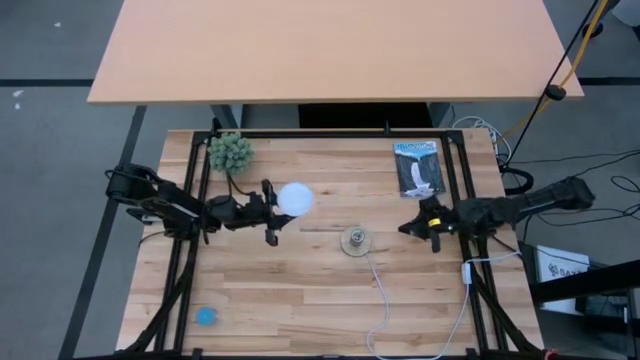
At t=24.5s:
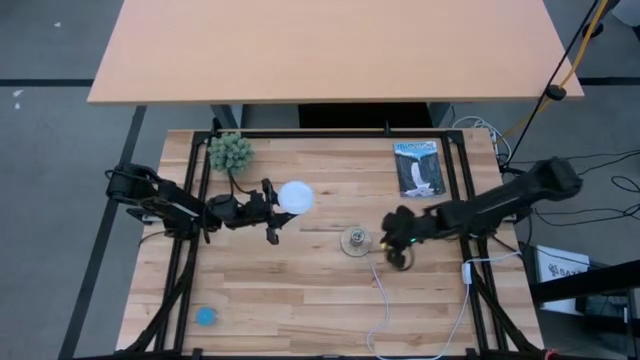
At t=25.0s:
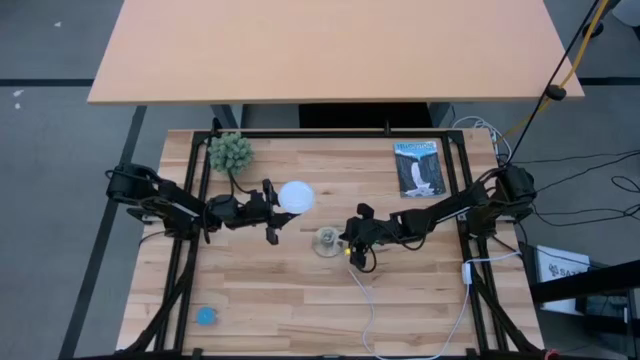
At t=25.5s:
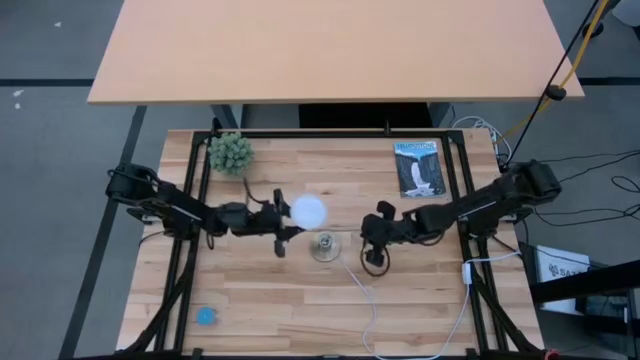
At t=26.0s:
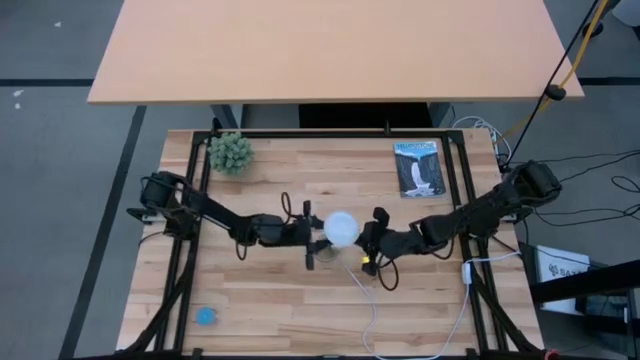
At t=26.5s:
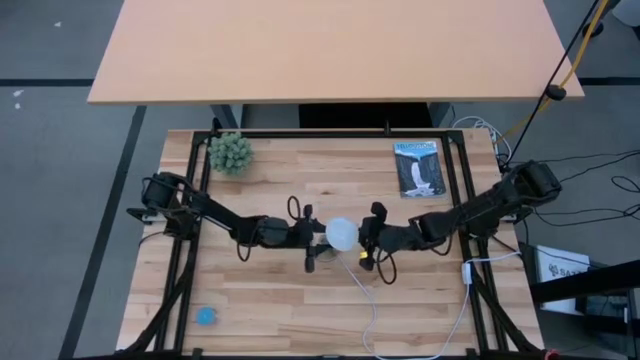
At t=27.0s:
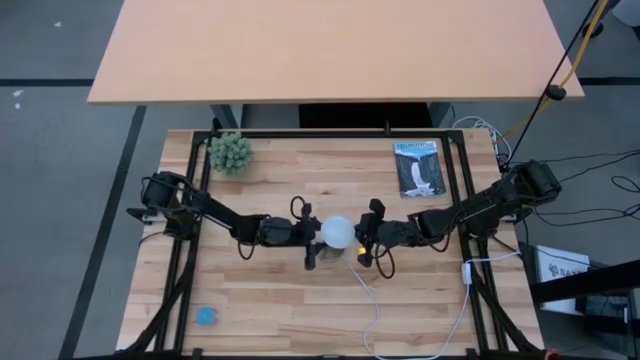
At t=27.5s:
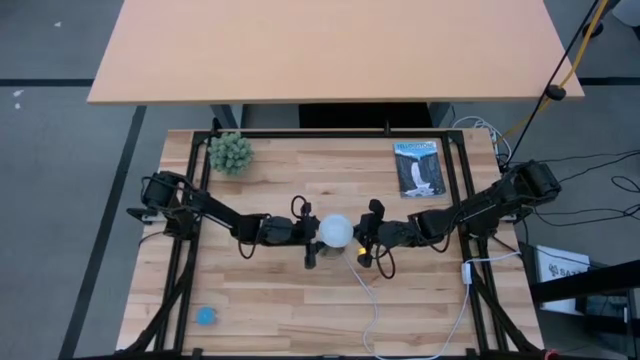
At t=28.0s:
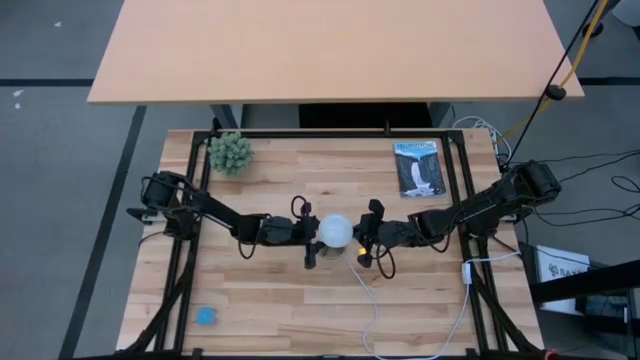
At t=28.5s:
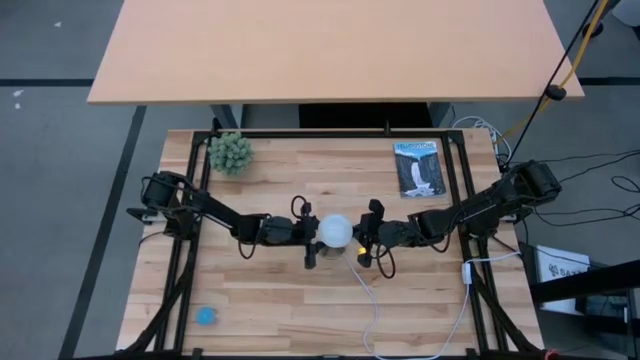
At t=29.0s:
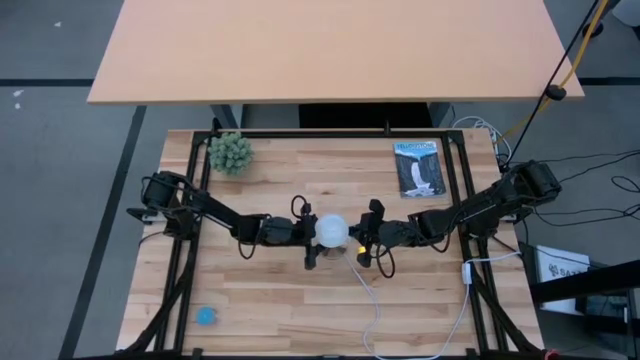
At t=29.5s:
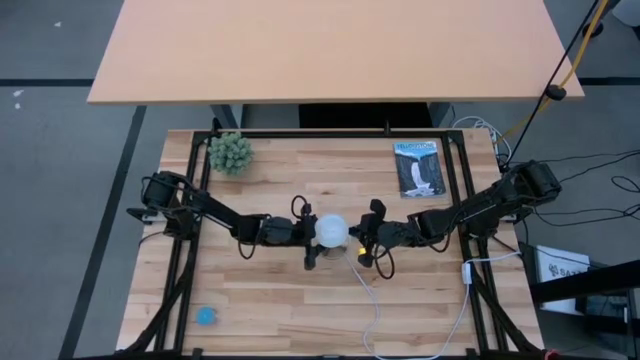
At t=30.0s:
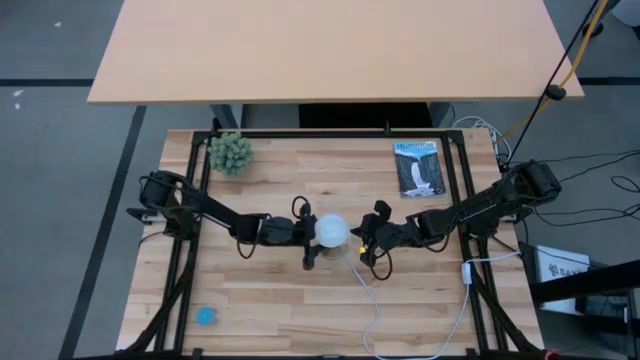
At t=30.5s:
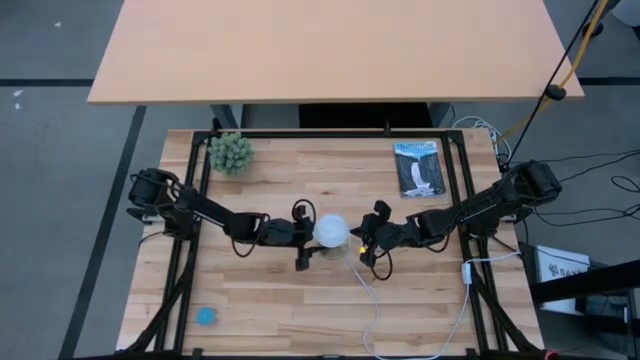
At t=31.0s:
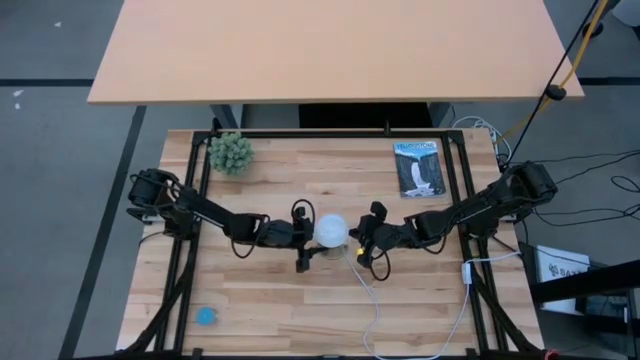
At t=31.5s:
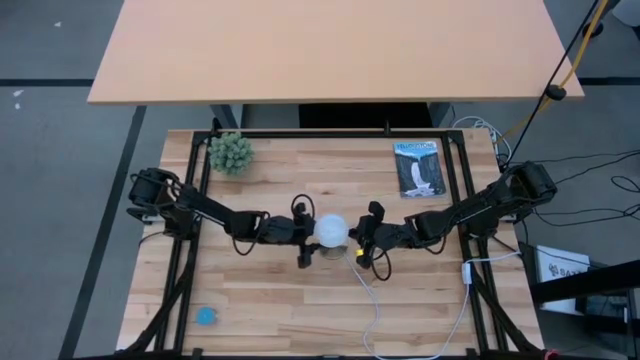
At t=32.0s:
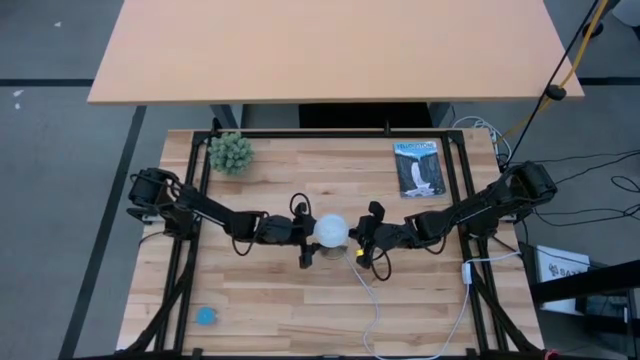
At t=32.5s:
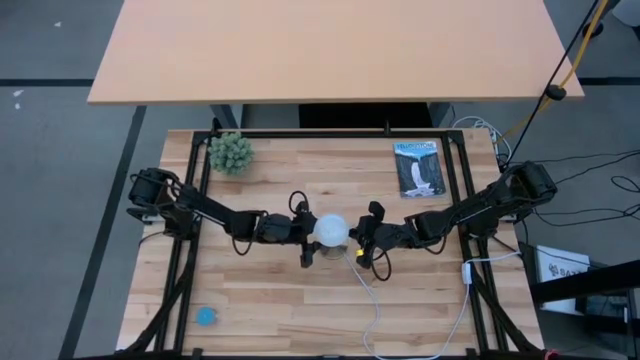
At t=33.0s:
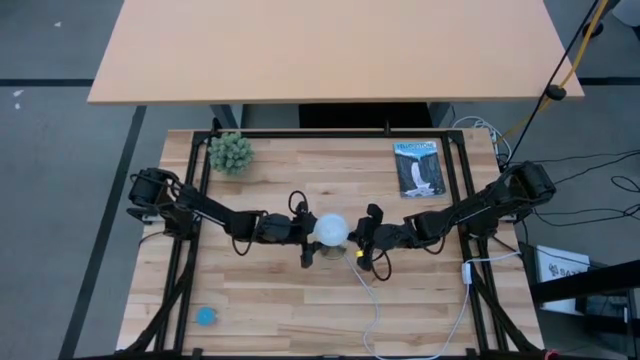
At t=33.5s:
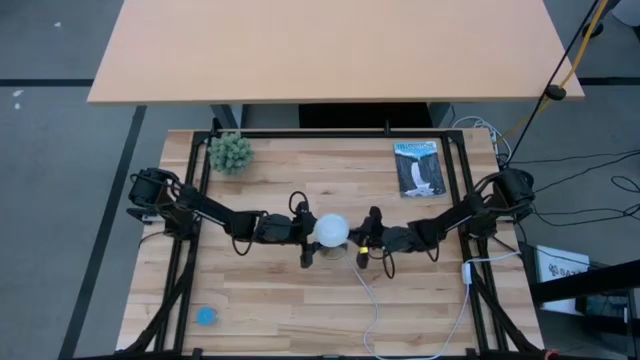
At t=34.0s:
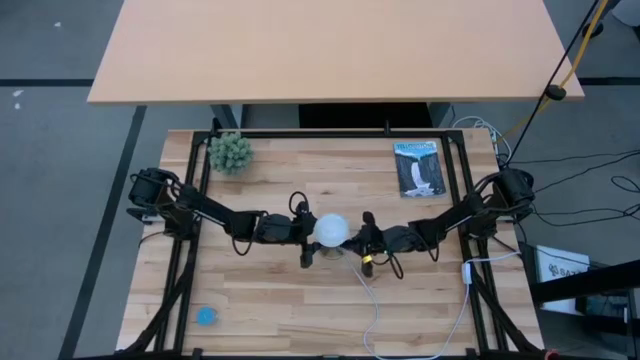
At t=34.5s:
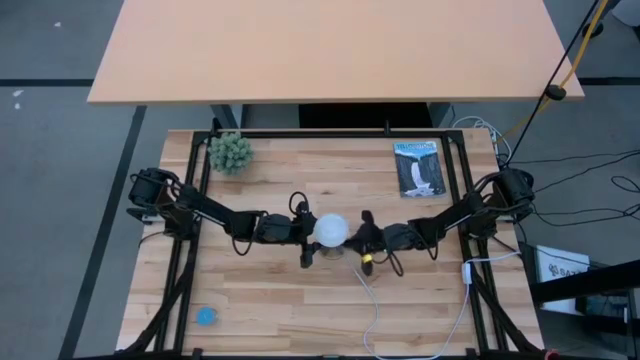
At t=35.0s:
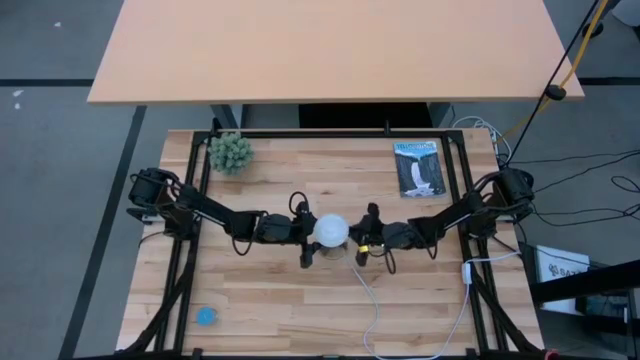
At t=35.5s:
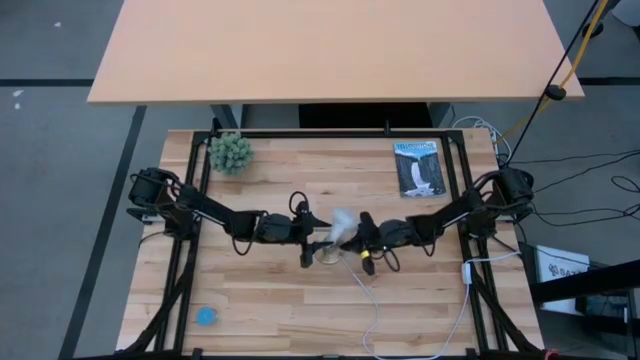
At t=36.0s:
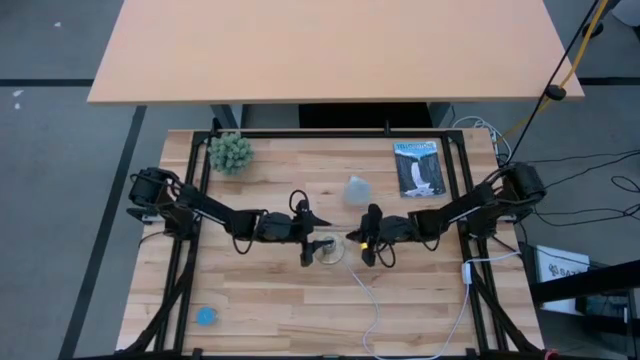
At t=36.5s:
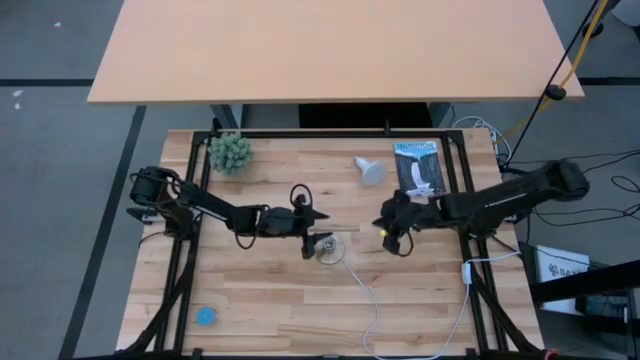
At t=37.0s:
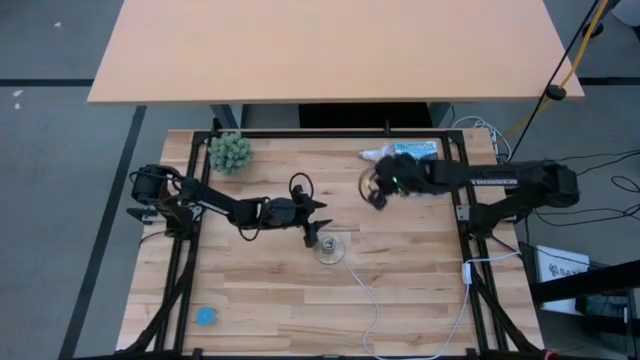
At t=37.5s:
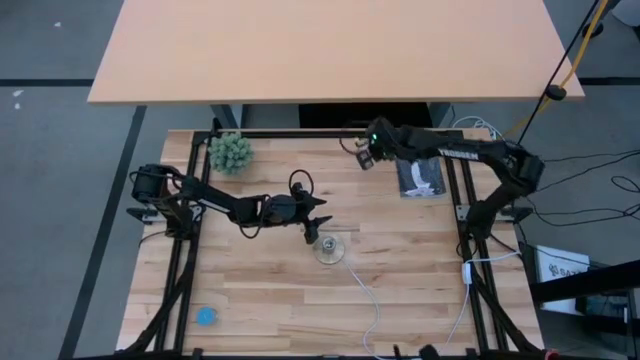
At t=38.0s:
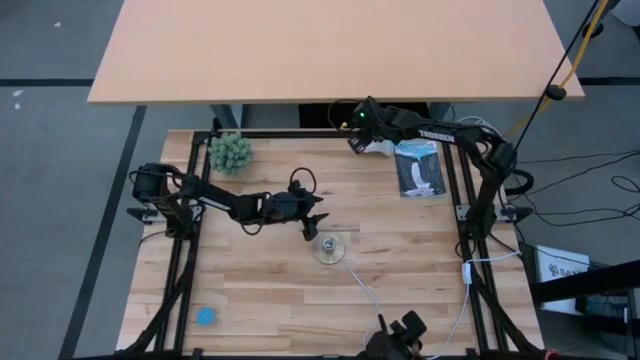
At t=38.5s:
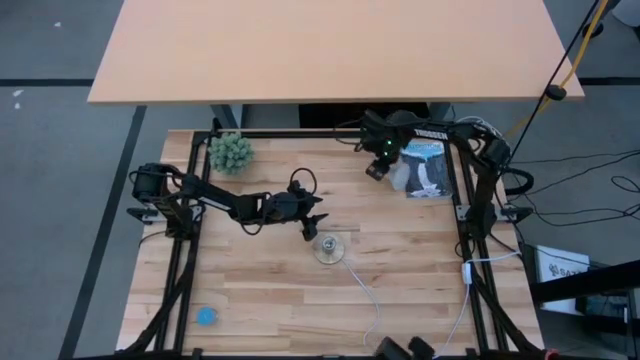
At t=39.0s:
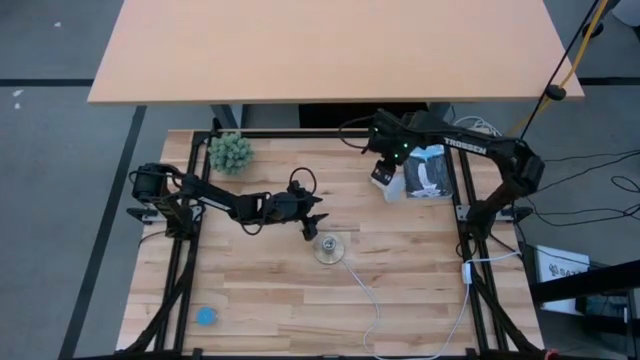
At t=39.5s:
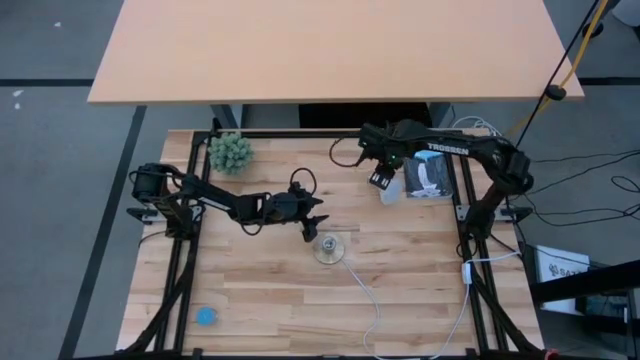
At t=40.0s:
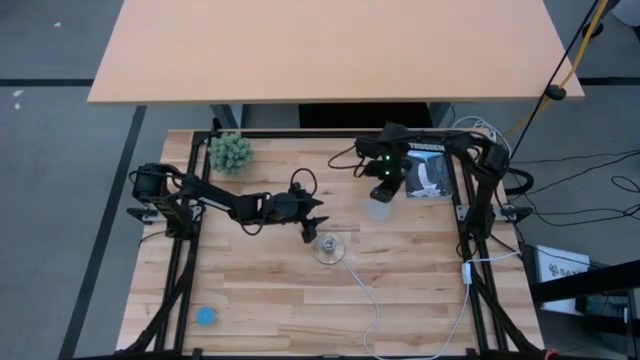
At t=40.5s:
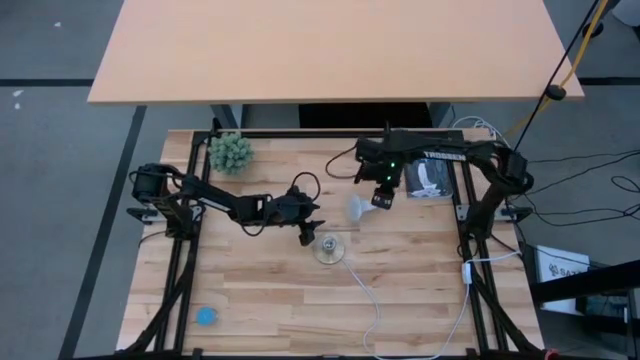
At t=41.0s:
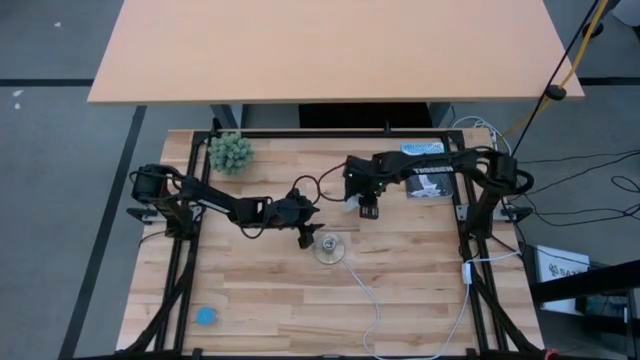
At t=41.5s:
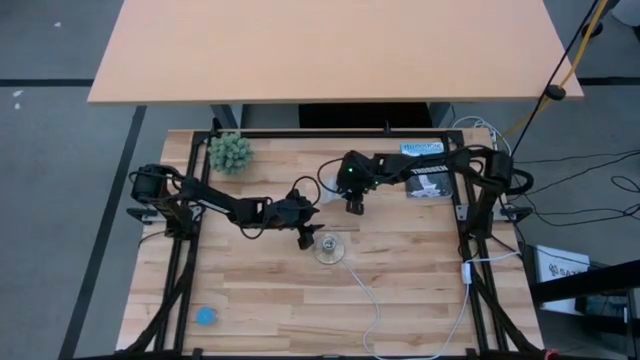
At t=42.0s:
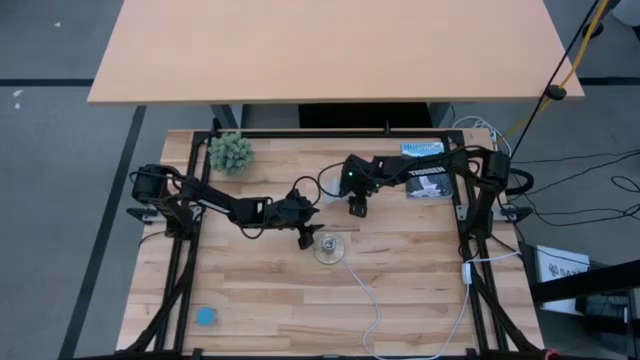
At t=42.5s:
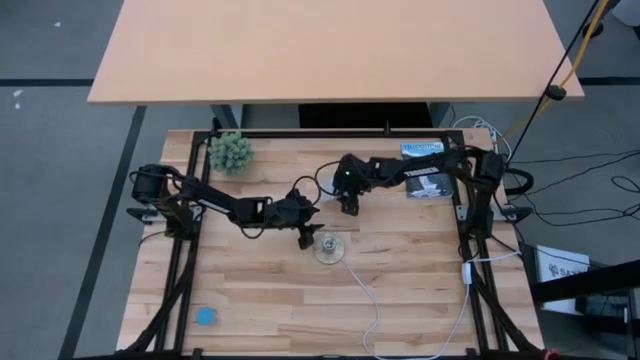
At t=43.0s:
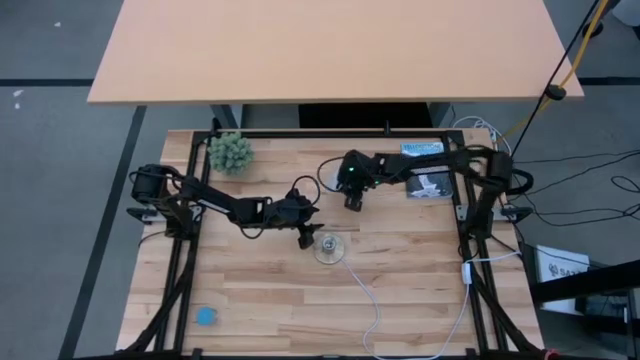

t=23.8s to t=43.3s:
Task: Screw lightbulb
Insert the white lightbulb into the desk lamp
